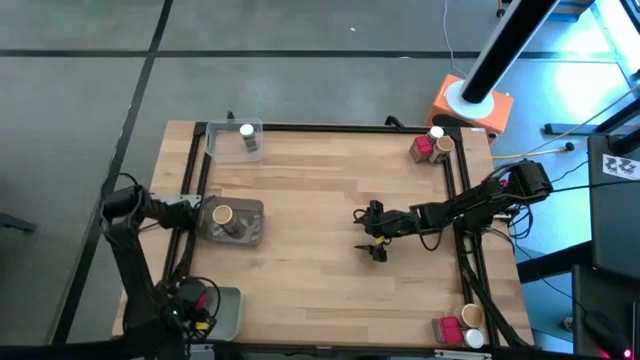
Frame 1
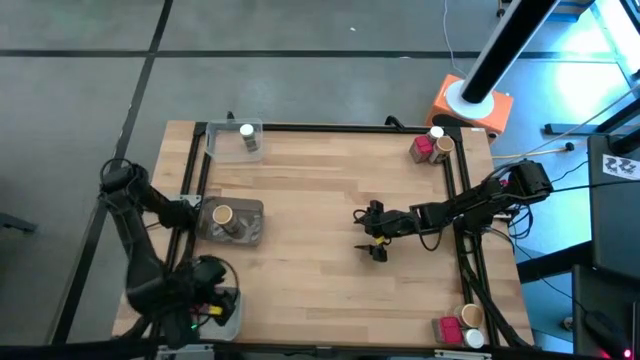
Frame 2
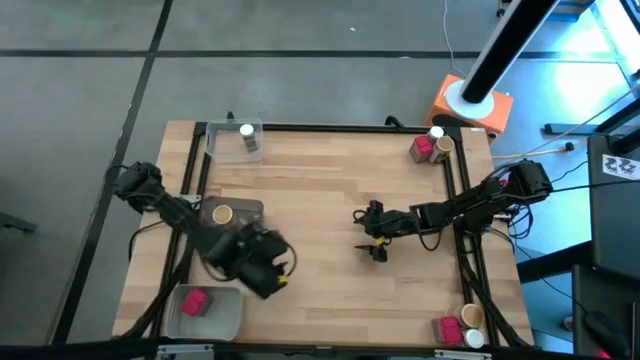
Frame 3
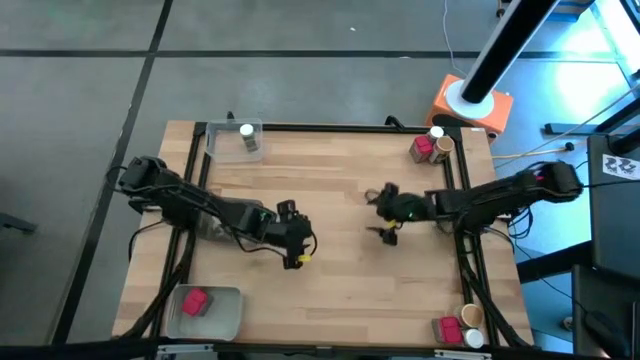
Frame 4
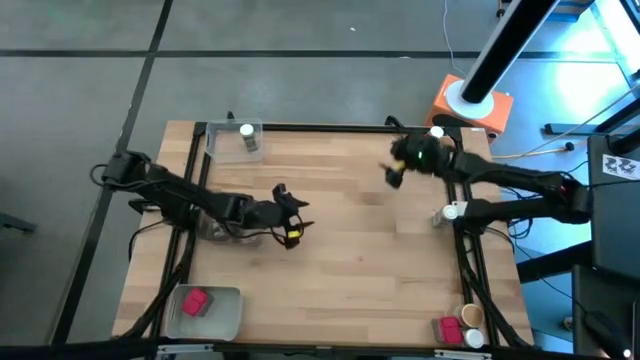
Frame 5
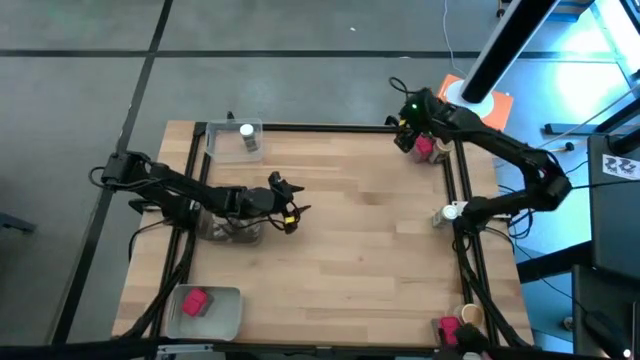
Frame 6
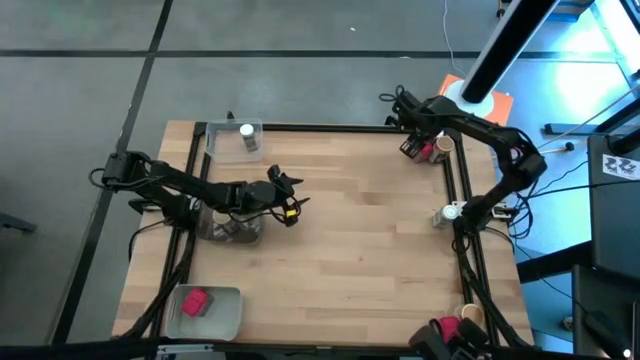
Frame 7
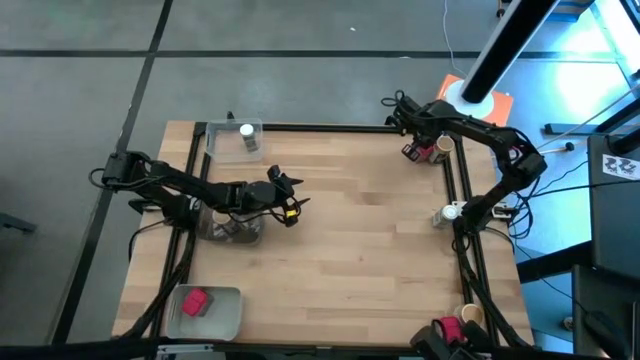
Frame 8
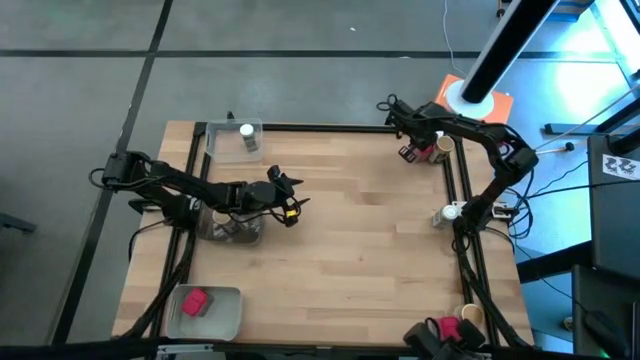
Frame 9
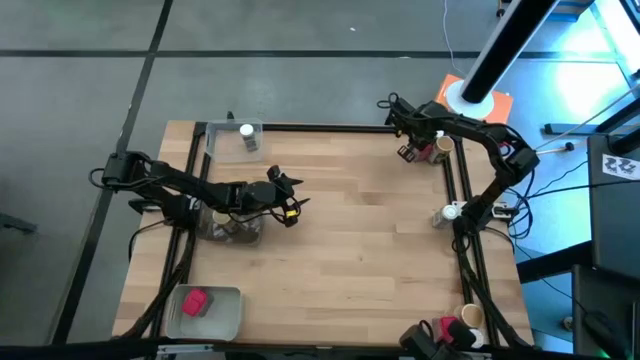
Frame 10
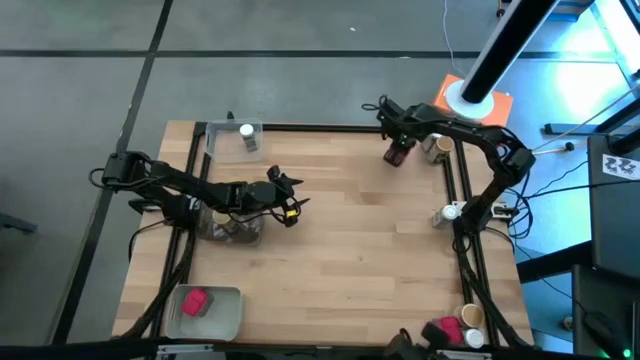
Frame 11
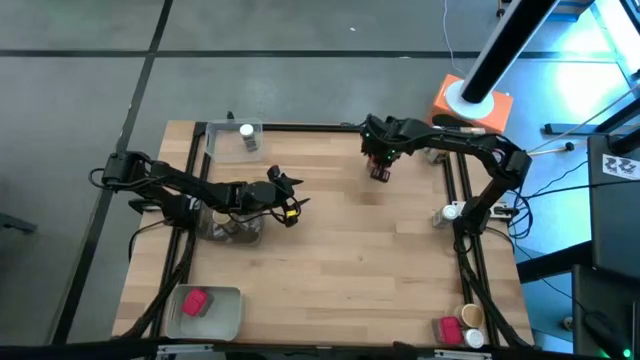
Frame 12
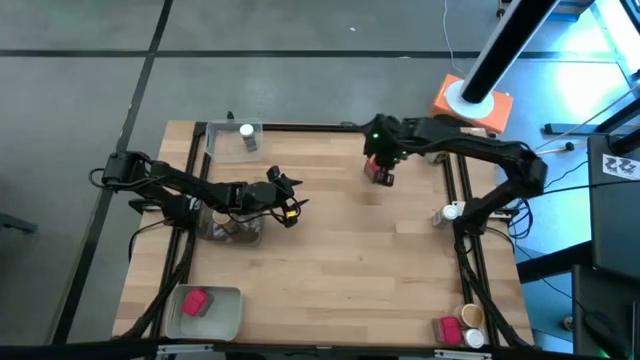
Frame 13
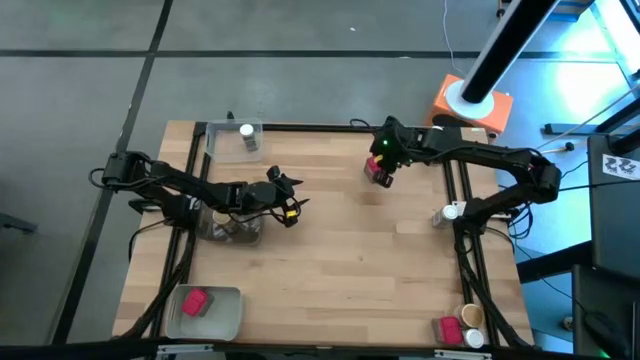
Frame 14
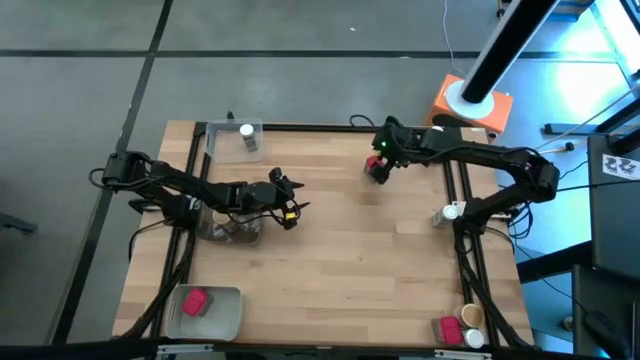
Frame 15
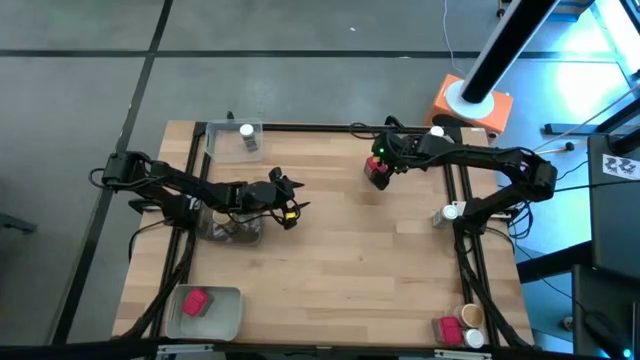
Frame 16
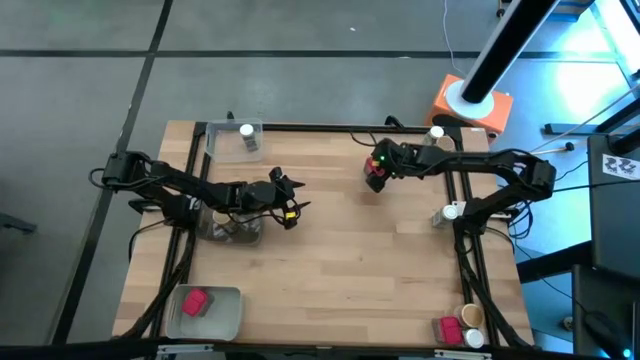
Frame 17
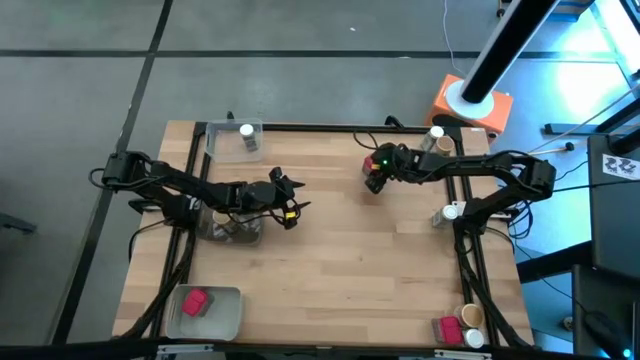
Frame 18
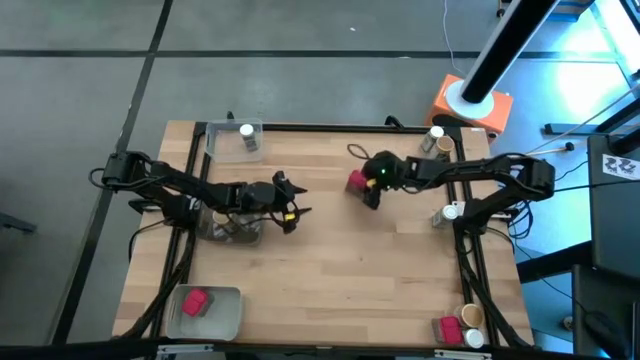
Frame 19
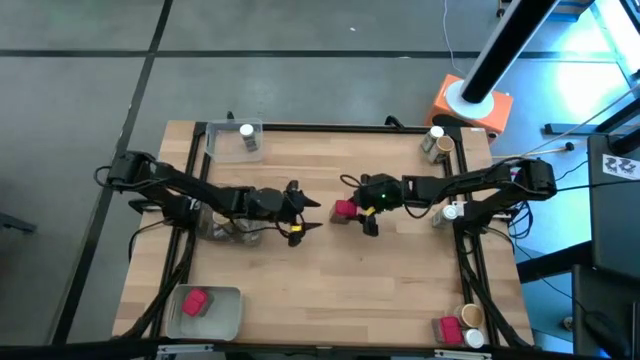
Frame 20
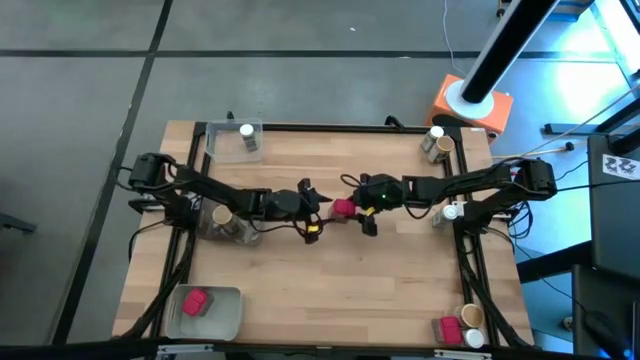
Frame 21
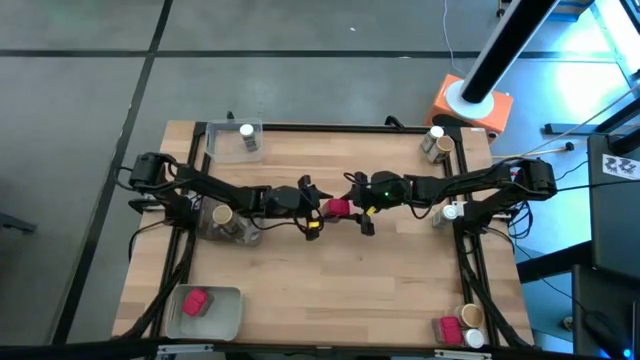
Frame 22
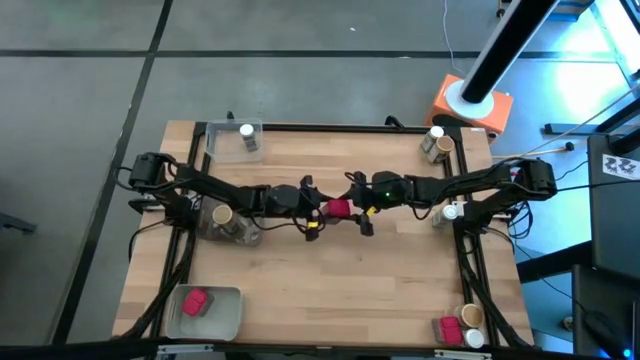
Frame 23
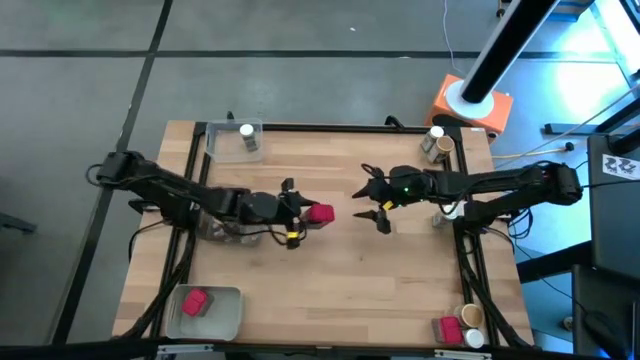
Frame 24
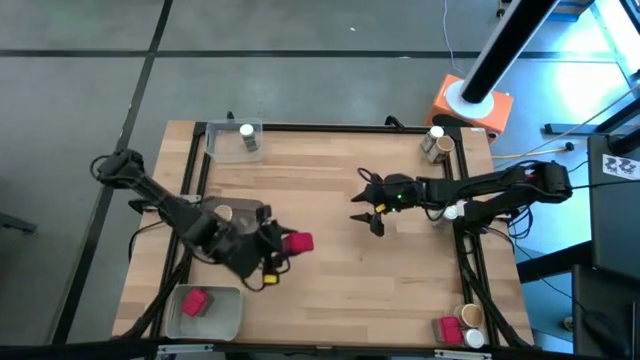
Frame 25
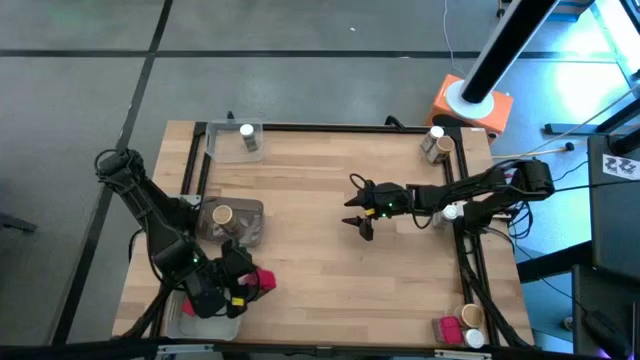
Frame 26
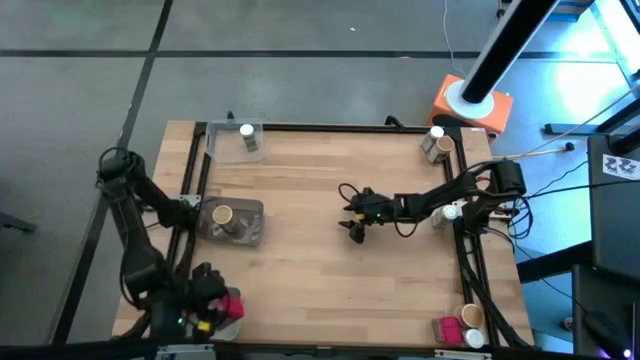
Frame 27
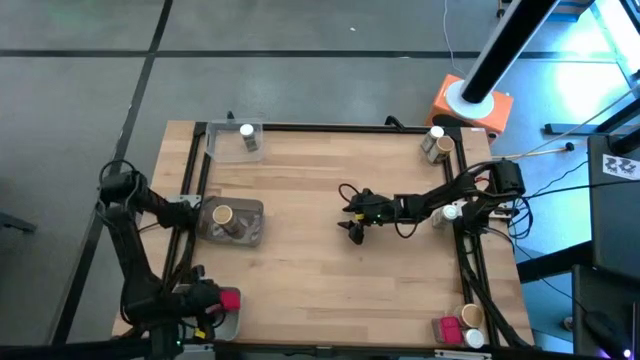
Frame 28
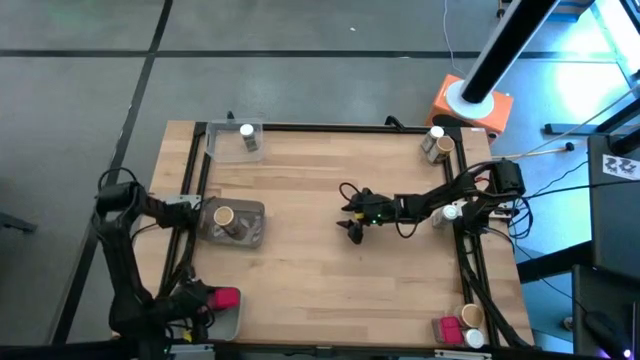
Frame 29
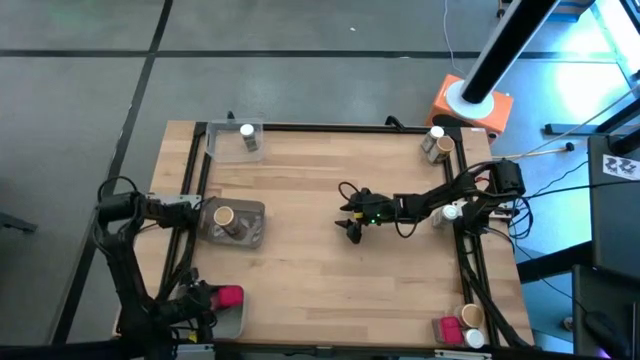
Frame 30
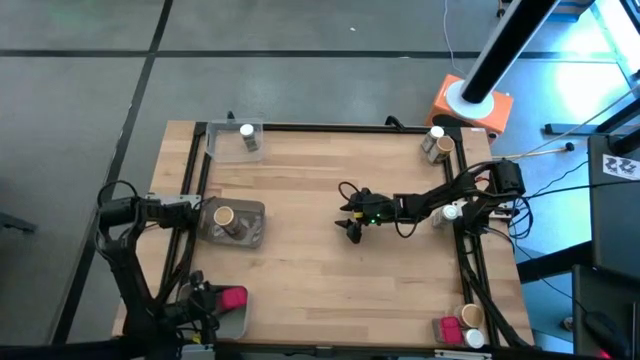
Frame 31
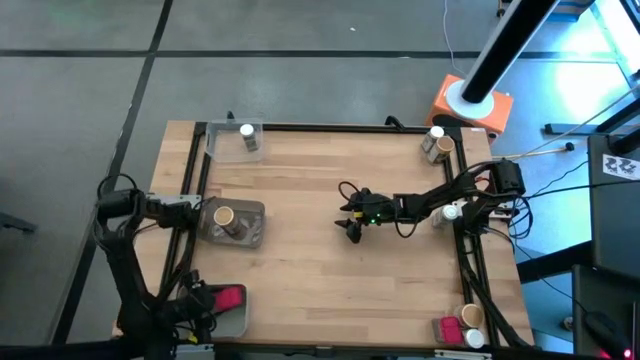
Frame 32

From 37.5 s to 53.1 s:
Task: Sort spices by type
Put the top red spice can into the gray bin

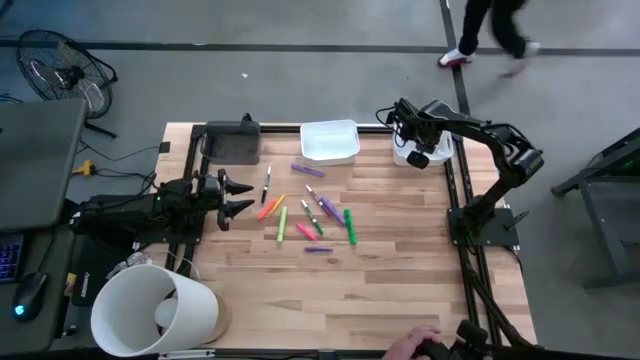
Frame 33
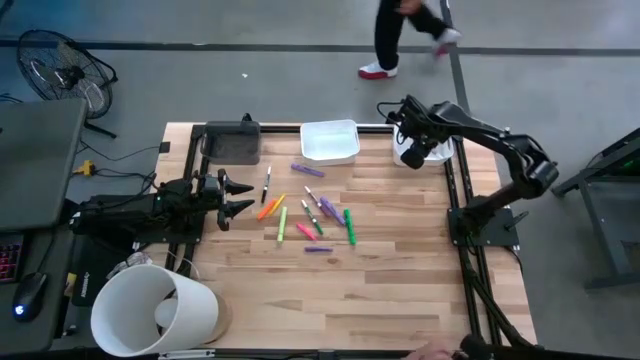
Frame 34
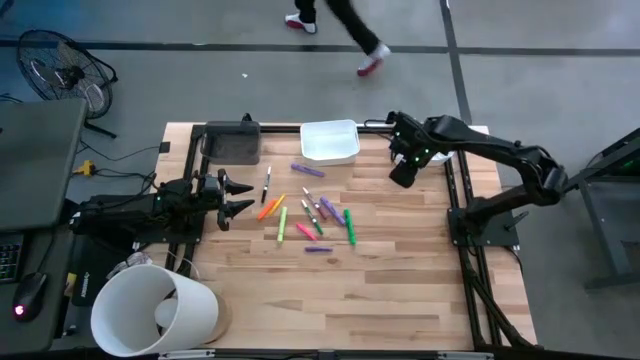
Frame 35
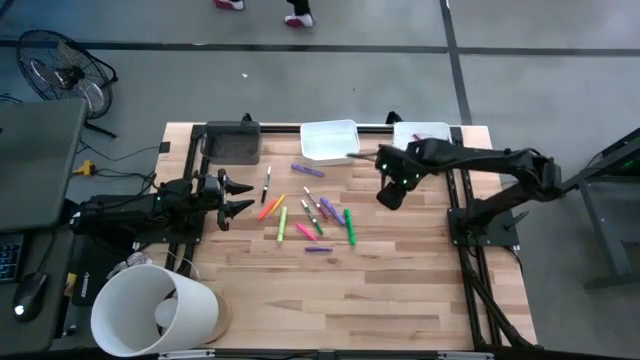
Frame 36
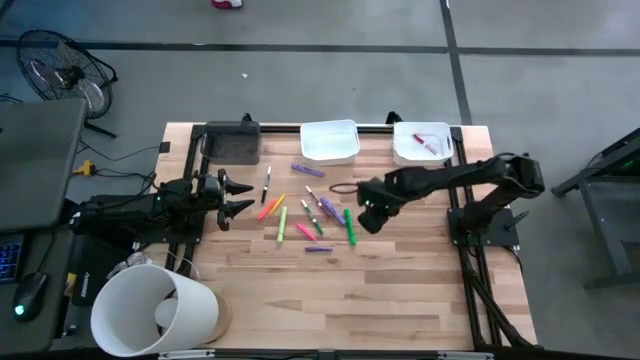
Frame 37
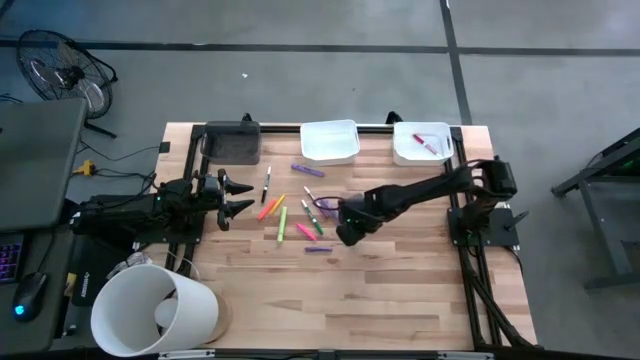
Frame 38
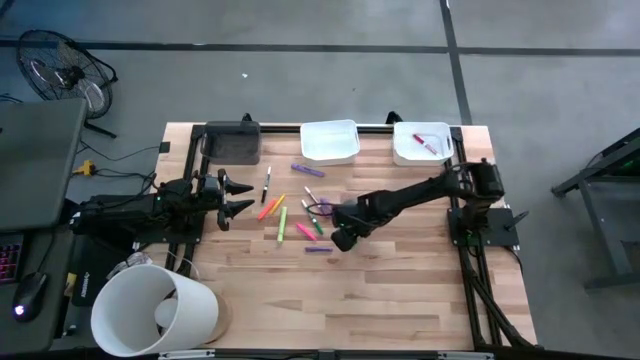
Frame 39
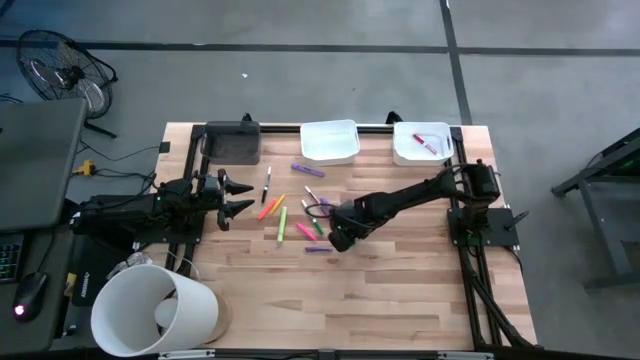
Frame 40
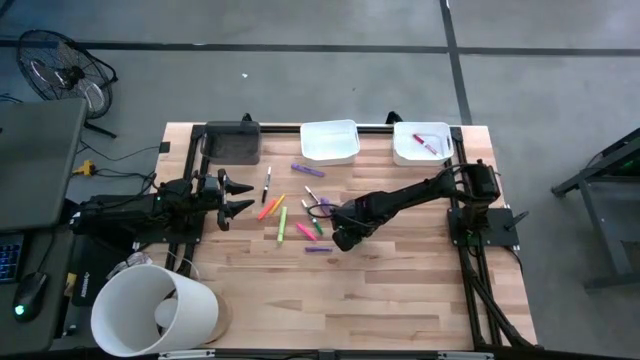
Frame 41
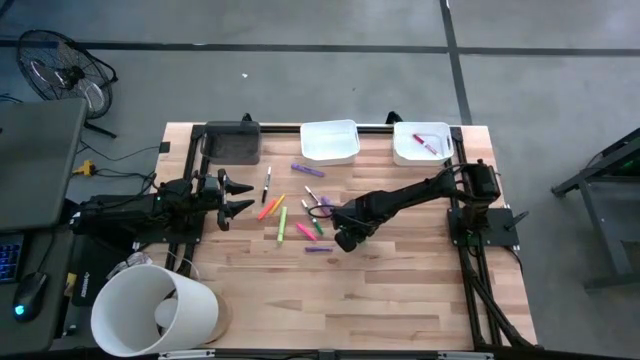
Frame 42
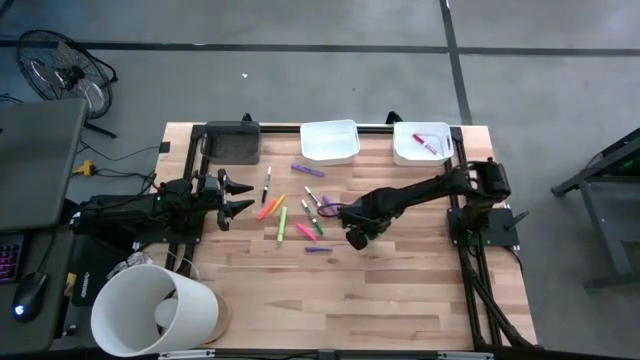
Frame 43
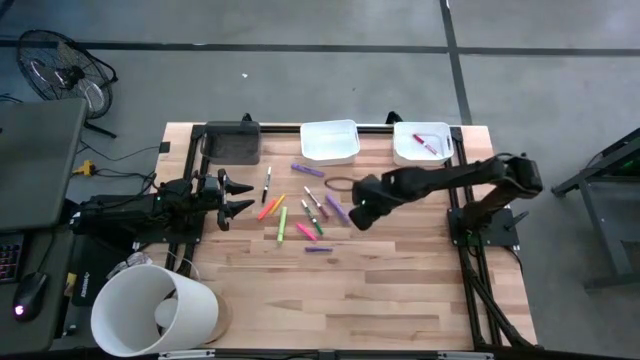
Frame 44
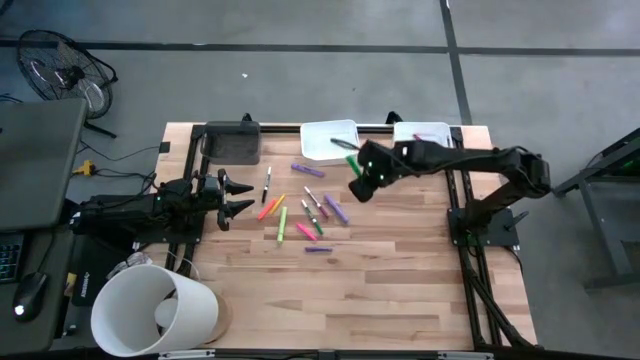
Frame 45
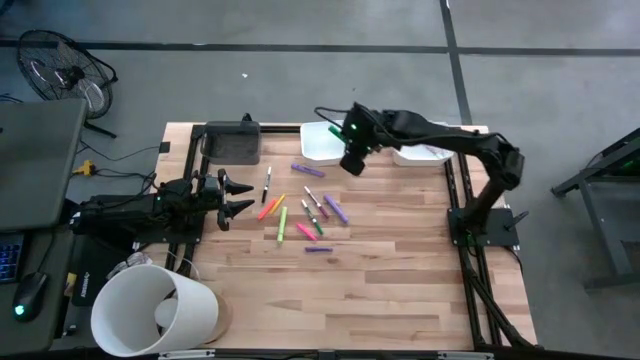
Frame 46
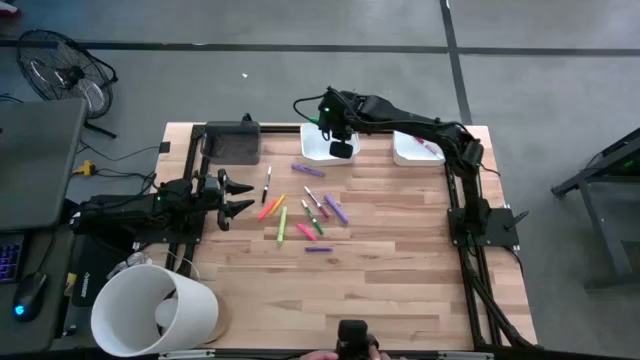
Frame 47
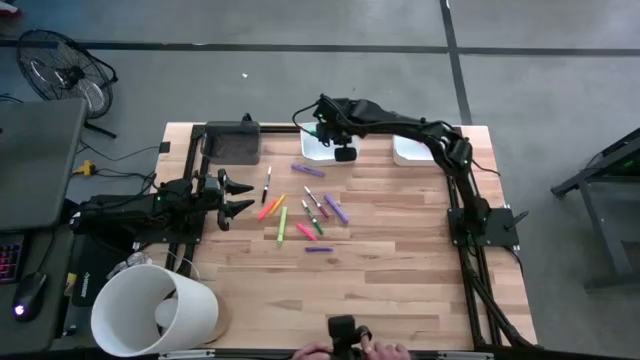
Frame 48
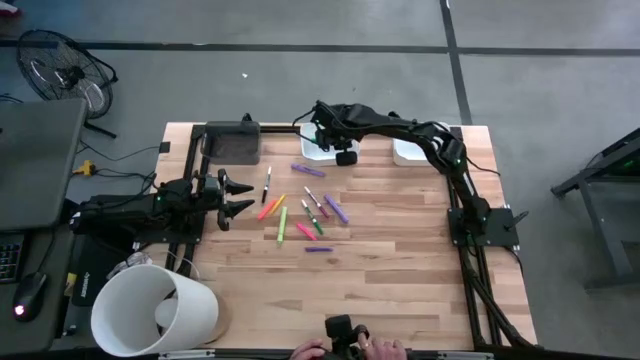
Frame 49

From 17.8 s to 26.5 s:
Task: Pick & Place Markers
Put the green highlighter pen into the left white bin
